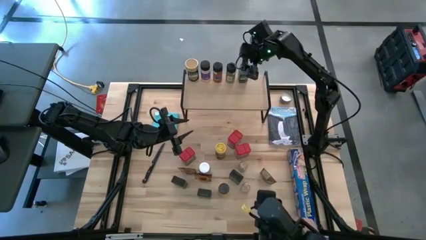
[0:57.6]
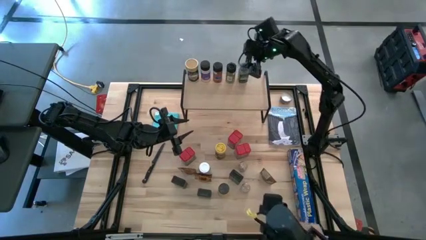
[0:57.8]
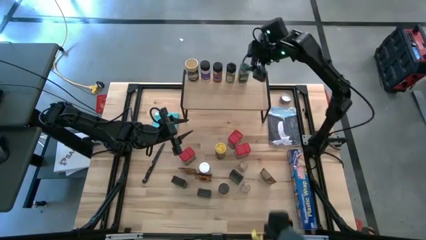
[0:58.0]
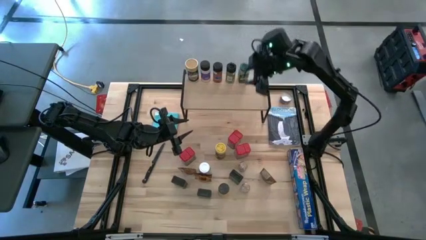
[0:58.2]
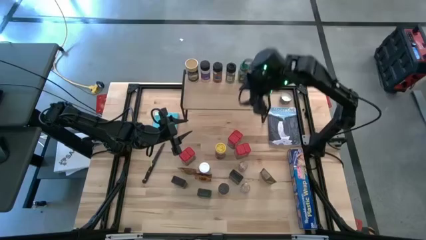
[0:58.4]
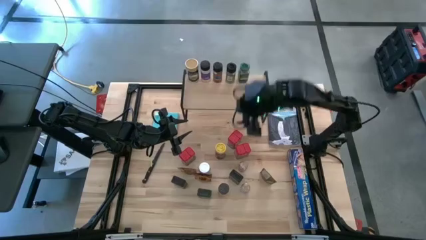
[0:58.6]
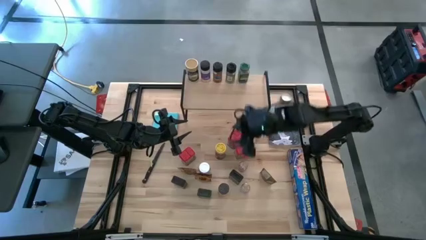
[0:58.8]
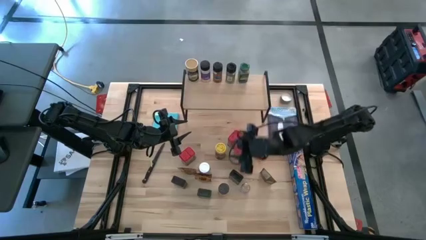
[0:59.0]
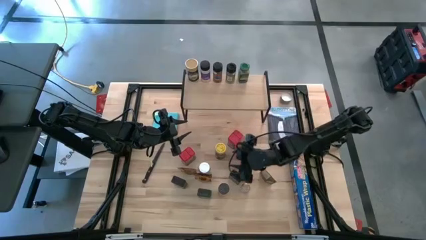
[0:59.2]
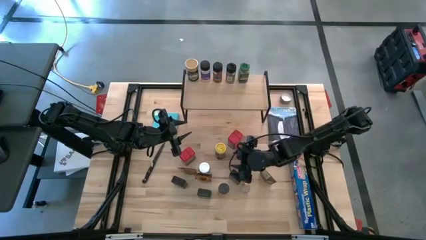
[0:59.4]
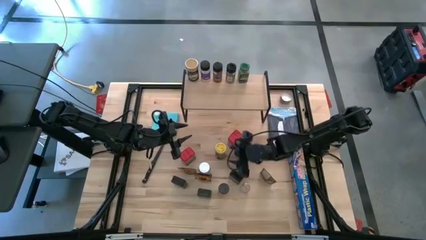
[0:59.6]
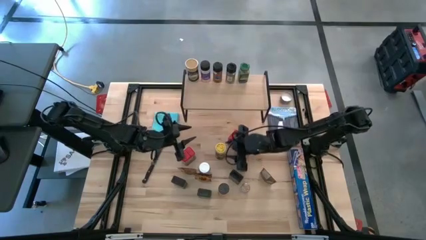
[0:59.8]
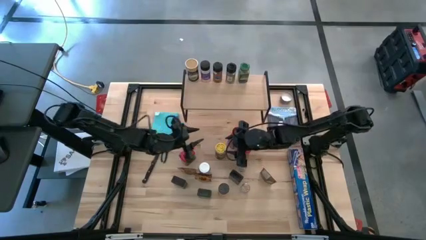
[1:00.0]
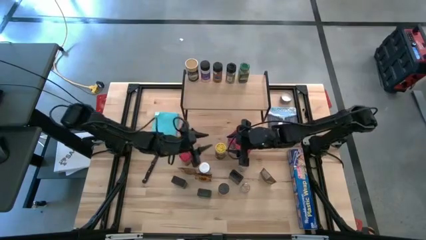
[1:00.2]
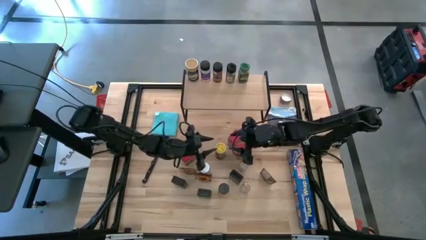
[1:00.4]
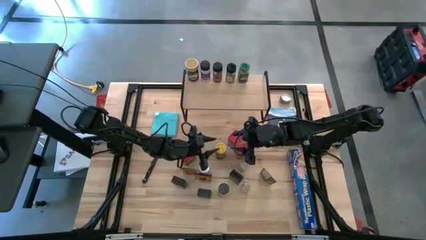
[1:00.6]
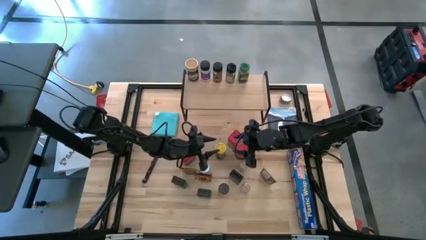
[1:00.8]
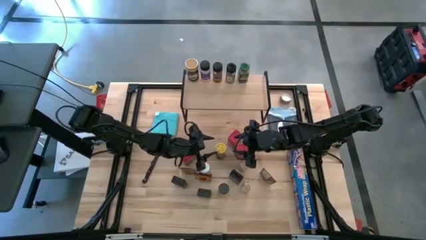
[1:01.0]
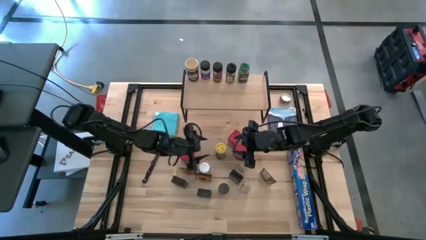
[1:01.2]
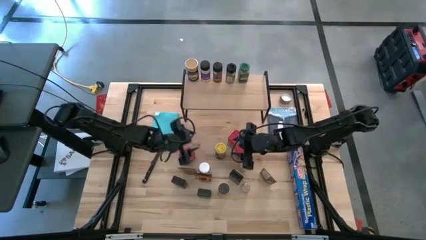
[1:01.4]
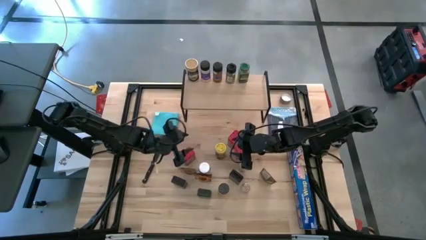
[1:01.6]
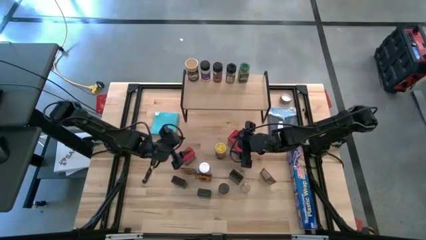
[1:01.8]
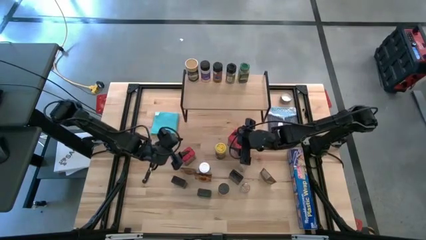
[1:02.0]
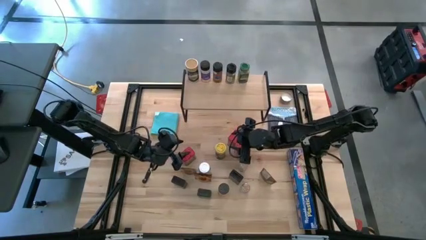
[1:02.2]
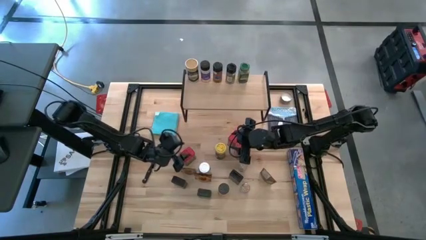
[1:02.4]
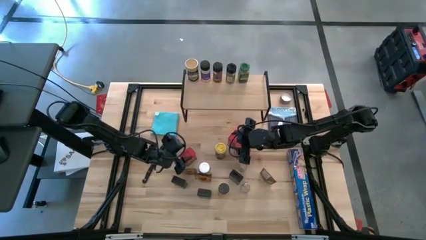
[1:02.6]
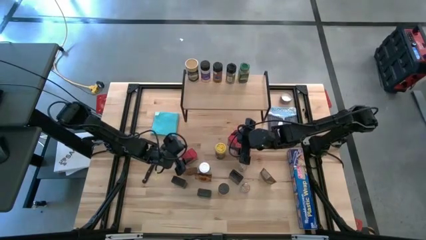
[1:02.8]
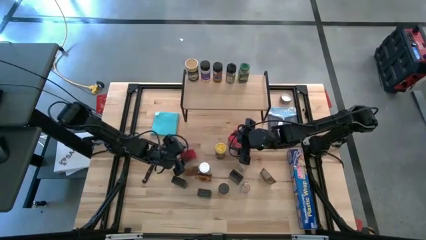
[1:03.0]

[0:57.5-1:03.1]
Task: Shelf spices
Put the red seasoning can on the shelf

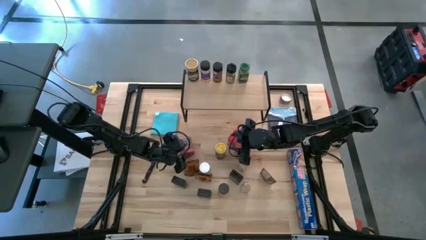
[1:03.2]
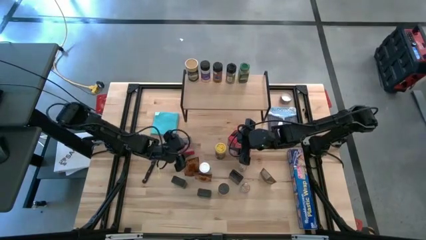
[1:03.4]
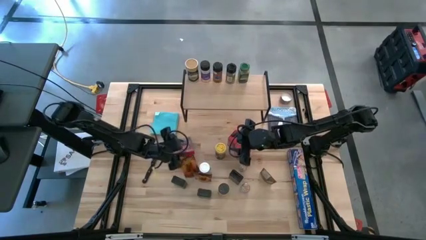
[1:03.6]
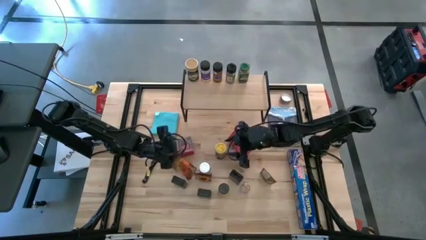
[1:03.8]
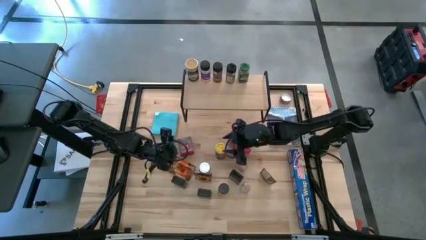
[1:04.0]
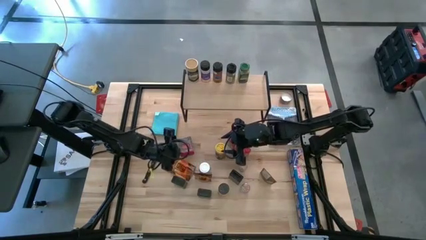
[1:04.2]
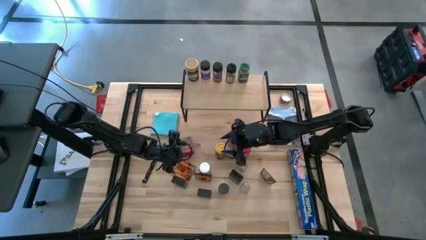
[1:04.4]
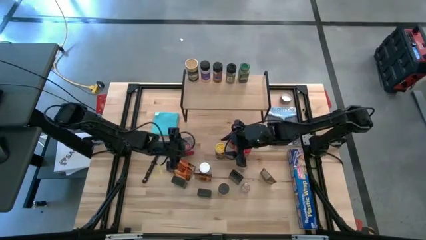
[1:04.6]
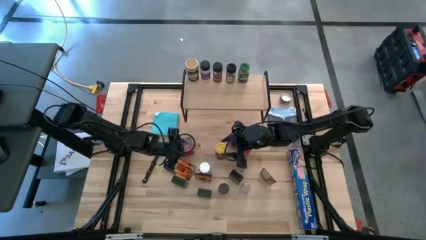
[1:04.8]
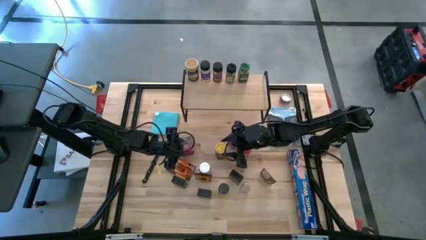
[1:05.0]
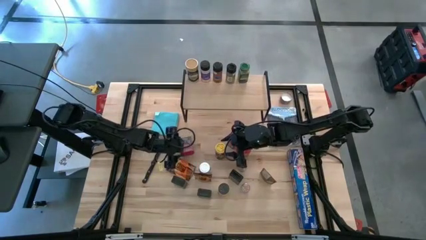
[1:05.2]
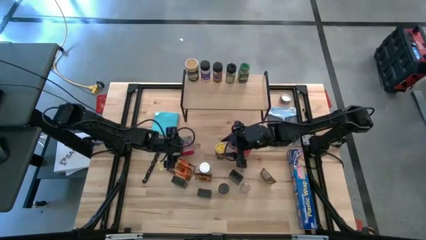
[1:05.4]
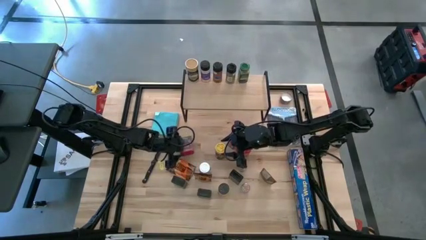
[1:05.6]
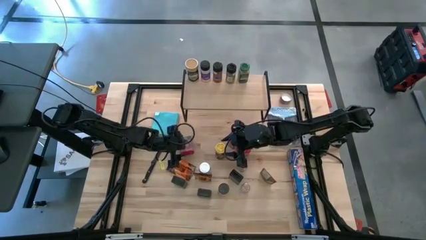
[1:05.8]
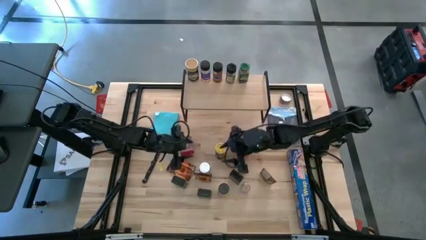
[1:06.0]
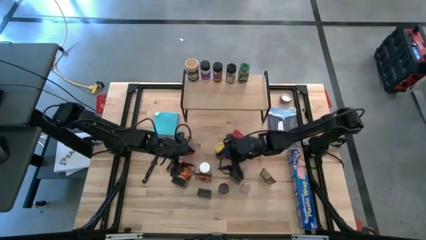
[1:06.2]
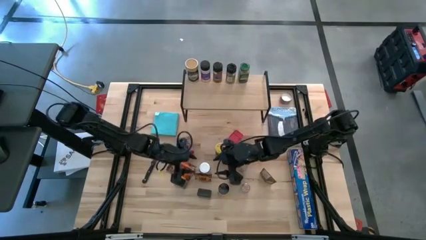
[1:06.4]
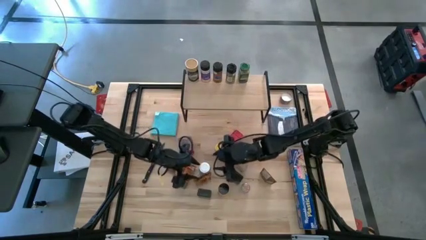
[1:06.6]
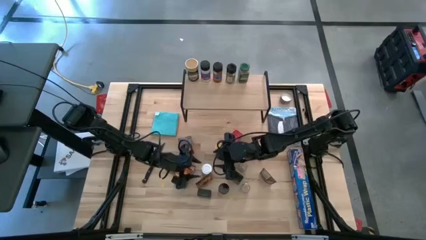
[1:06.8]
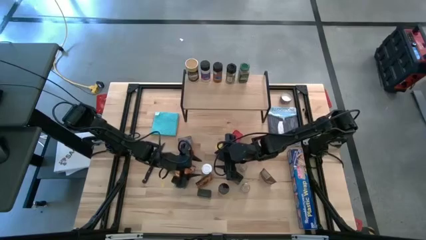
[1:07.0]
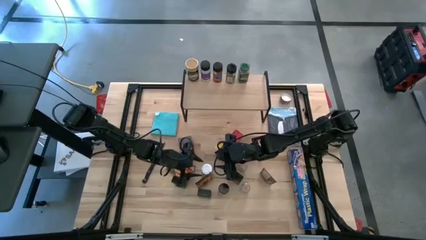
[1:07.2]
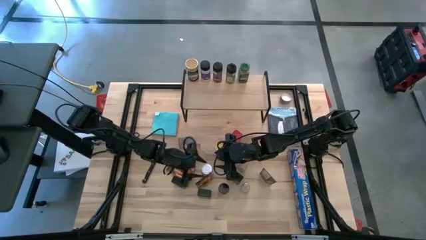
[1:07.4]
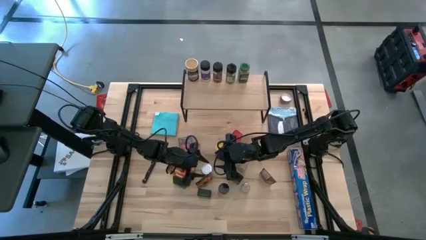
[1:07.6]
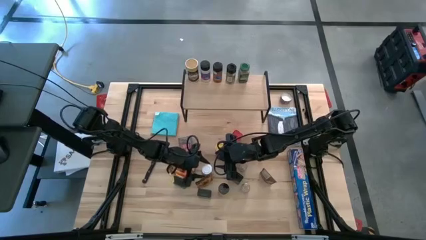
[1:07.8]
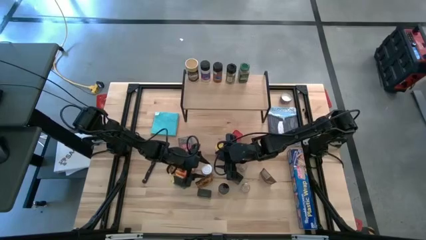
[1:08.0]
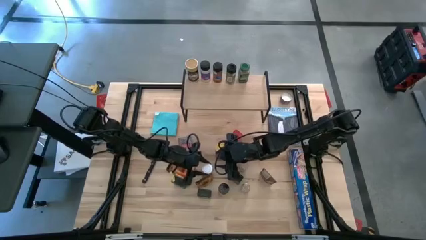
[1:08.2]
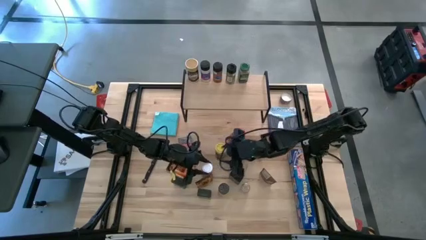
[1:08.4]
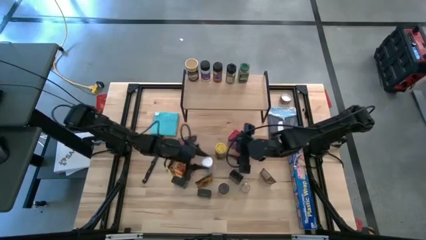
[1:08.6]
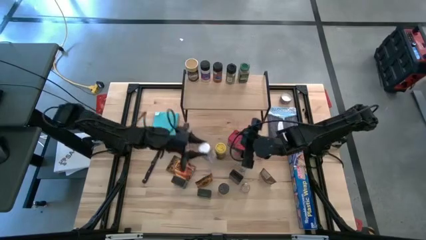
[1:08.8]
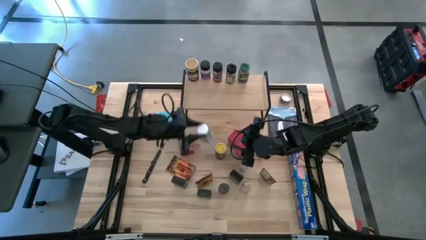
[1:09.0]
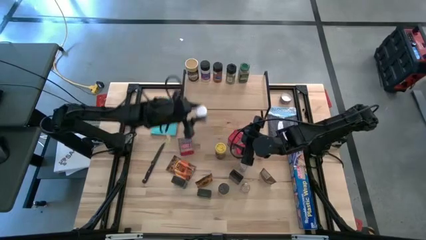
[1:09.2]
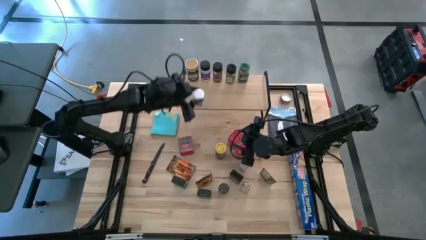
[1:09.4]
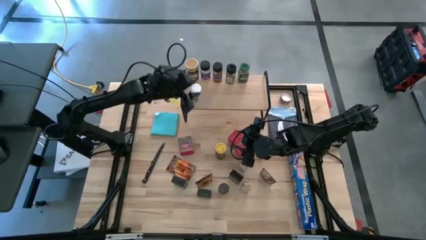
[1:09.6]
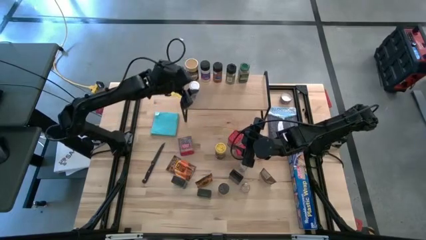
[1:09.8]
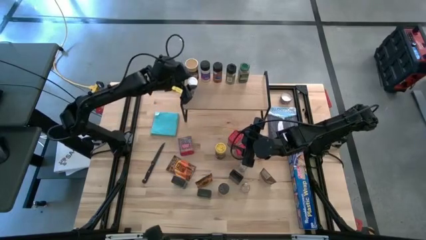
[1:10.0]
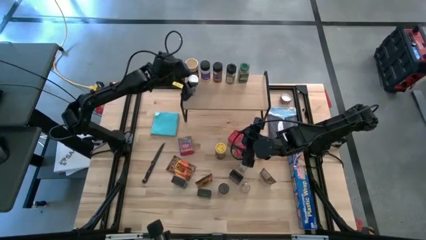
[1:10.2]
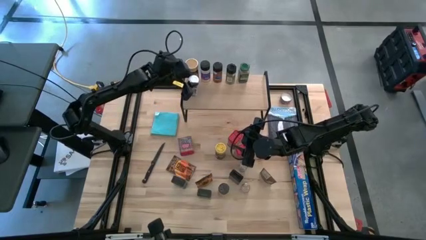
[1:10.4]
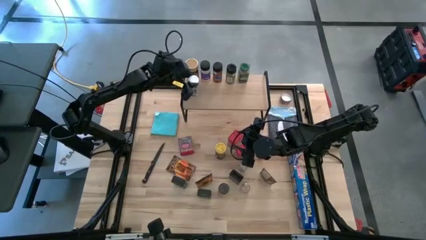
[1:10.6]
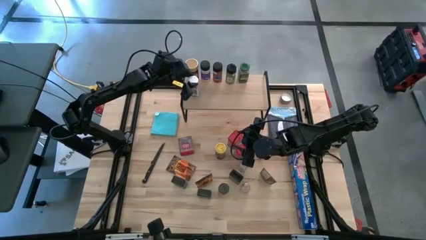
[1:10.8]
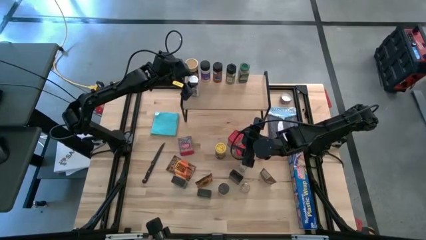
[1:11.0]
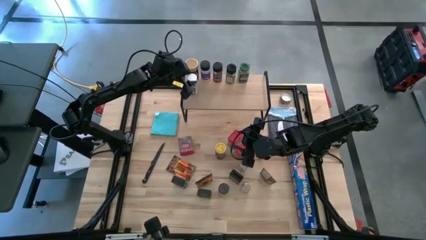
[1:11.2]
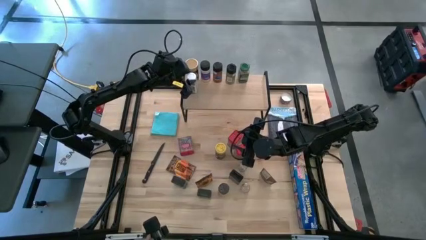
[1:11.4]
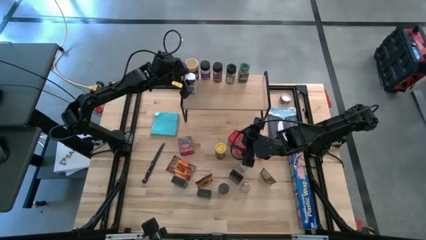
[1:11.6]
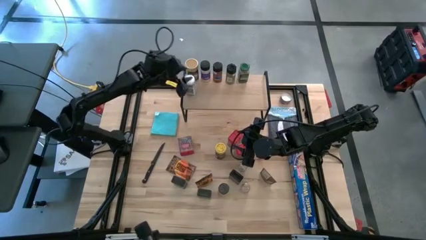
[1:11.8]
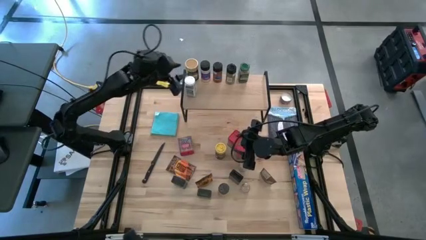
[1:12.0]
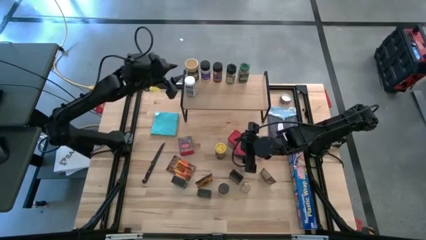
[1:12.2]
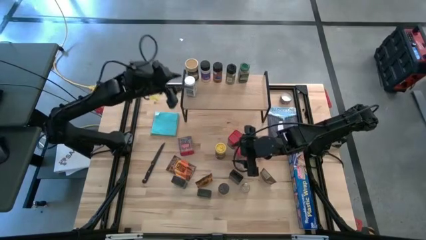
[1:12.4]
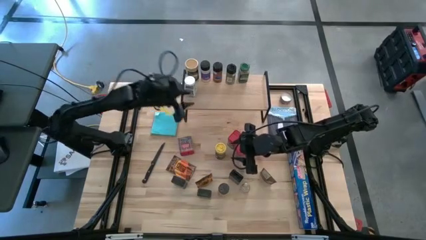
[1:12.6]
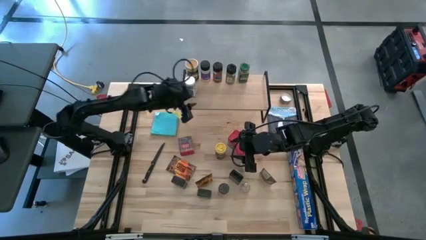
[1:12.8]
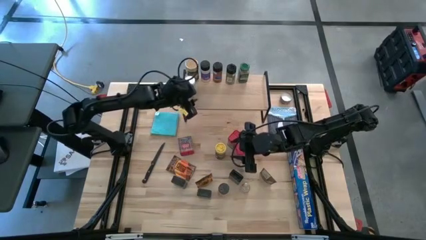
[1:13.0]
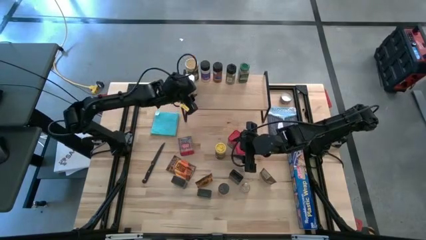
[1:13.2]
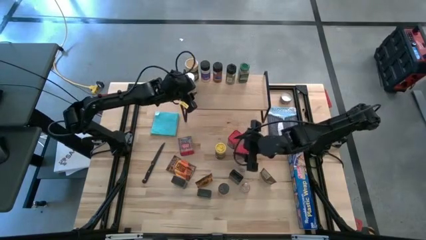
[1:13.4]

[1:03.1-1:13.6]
Put the white seasoning bottle on the shelf

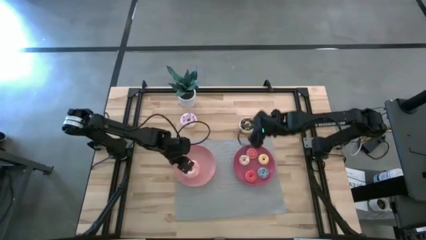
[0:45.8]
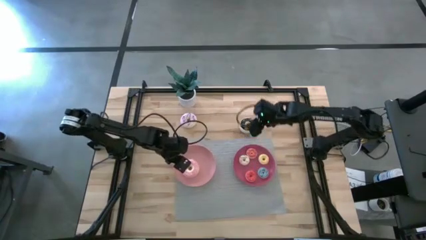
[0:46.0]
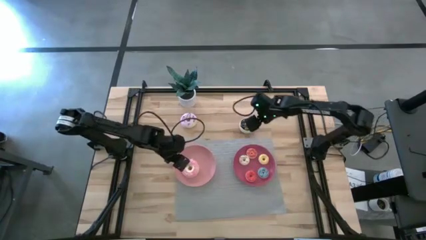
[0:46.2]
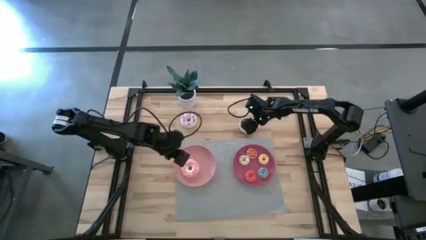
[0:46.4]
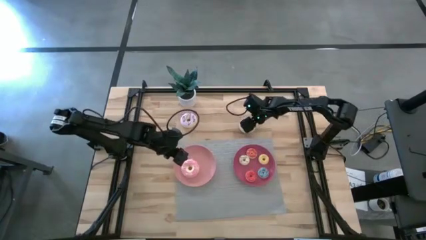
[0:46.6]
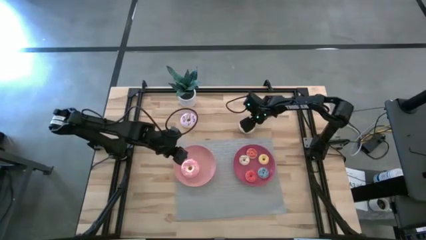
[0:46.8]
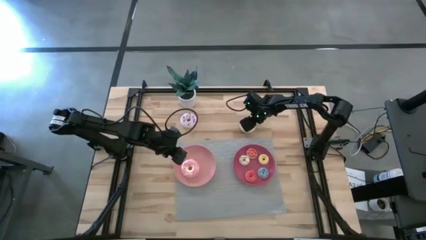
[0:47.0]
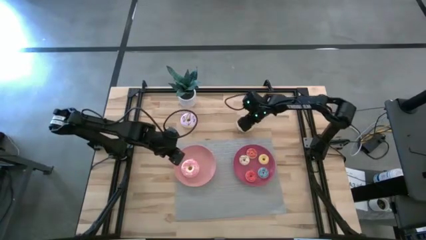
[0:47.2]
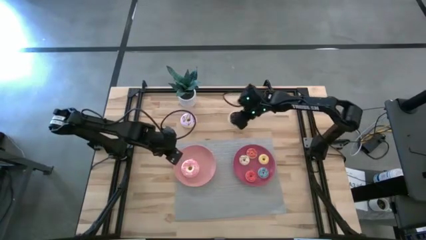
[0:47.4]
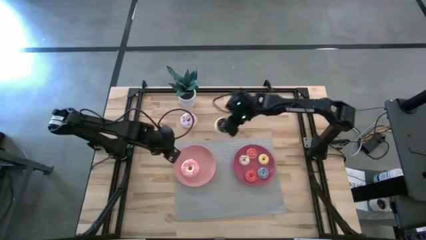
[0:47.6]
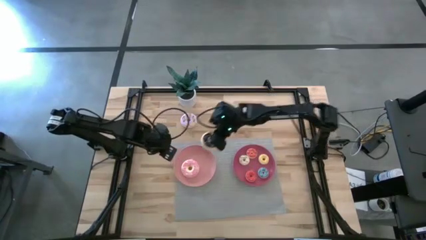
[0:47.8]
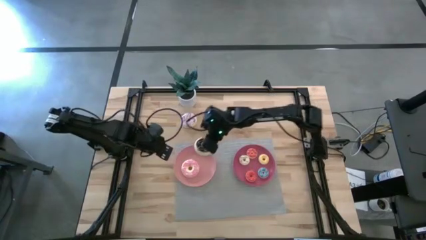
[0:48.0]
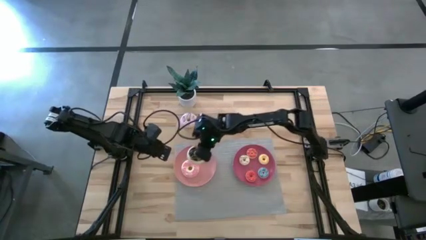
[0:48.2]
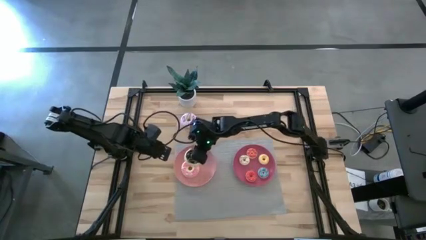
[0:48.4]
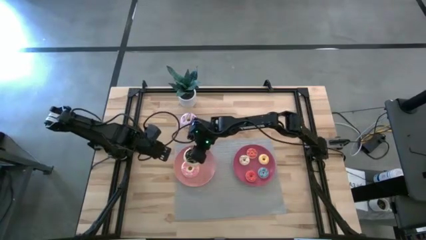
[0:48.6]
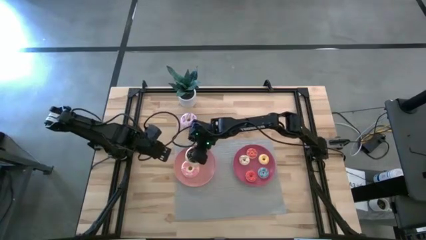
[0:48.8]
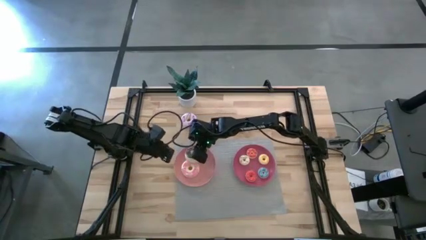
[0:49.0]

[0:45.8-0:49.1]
Task: Pick & Place donuts
Put the large black donut on the light pink plate
